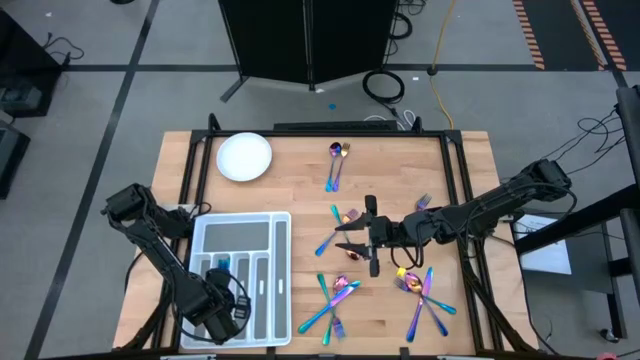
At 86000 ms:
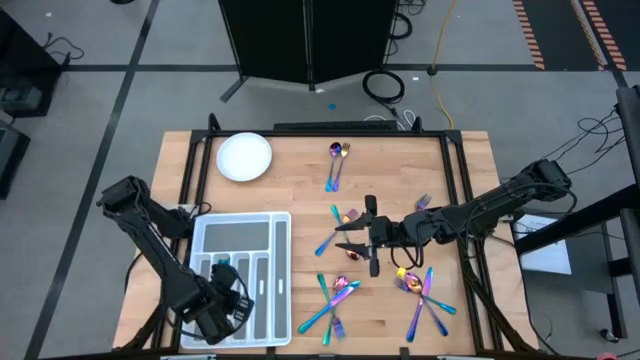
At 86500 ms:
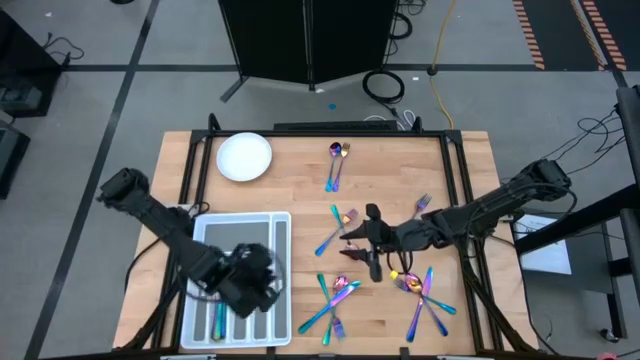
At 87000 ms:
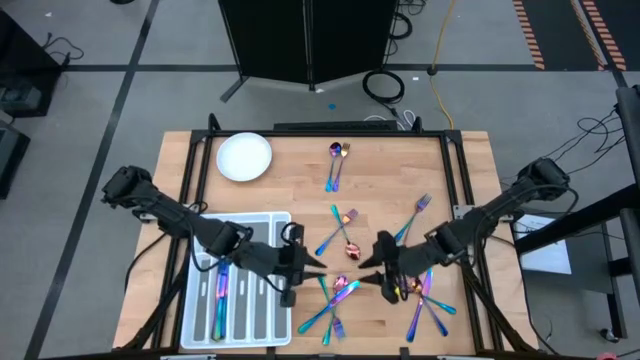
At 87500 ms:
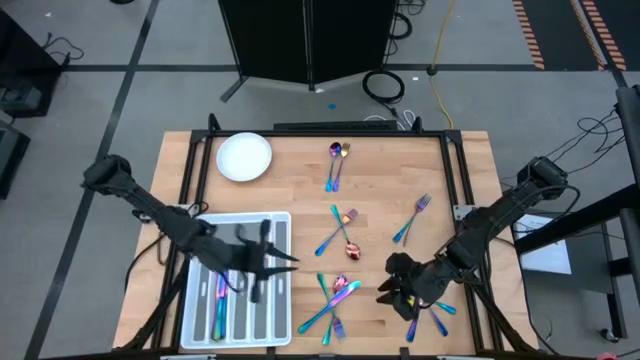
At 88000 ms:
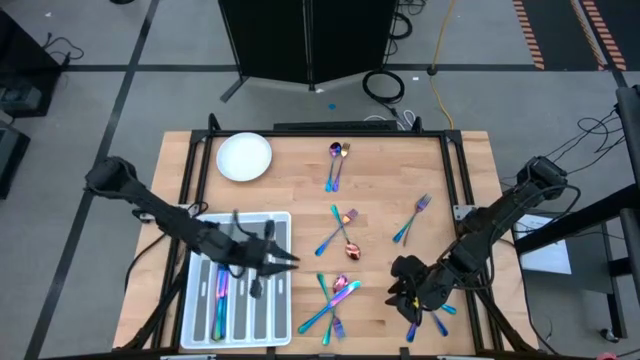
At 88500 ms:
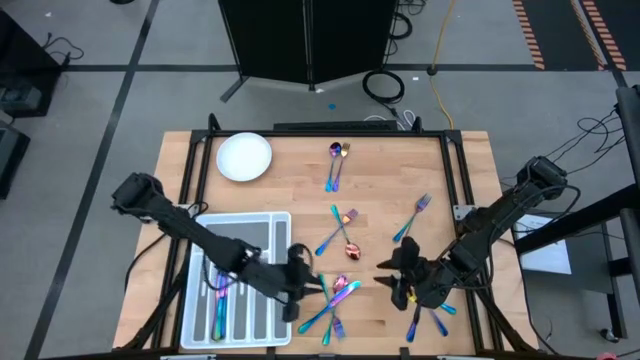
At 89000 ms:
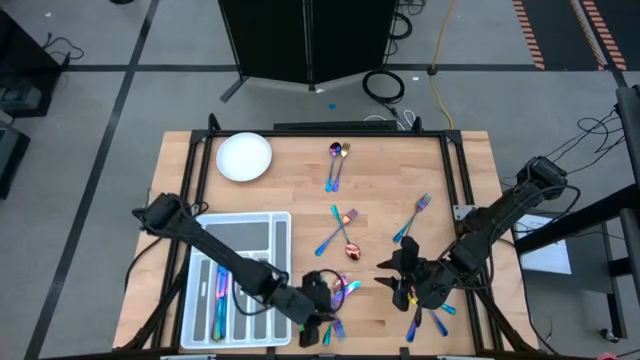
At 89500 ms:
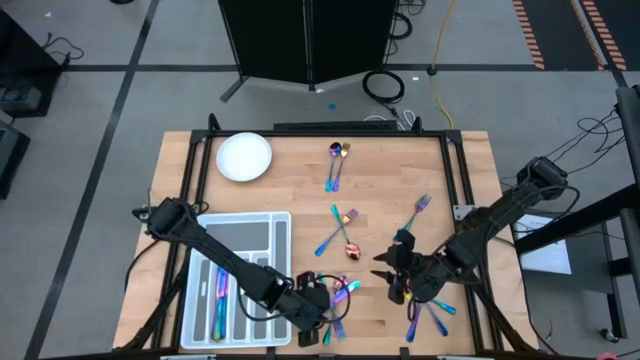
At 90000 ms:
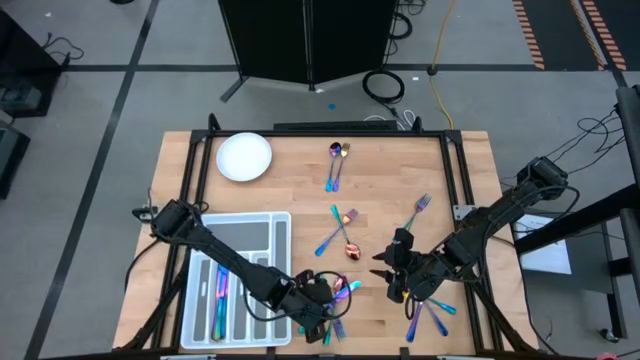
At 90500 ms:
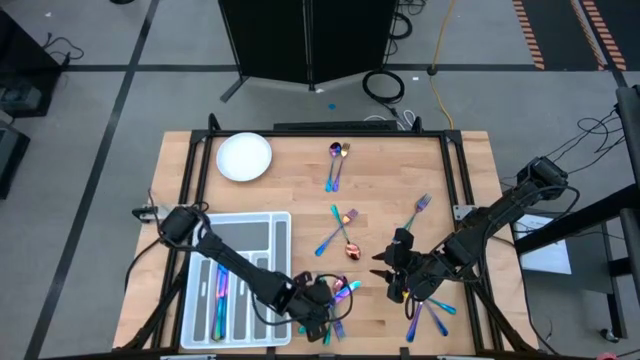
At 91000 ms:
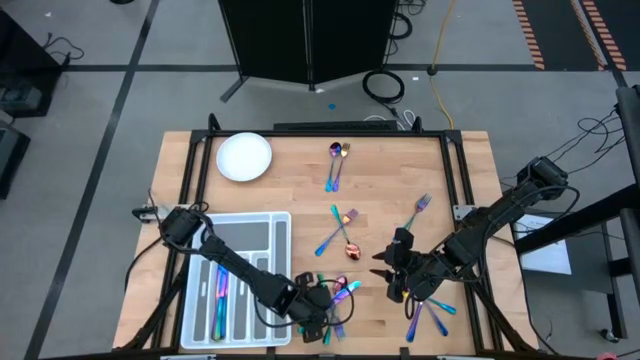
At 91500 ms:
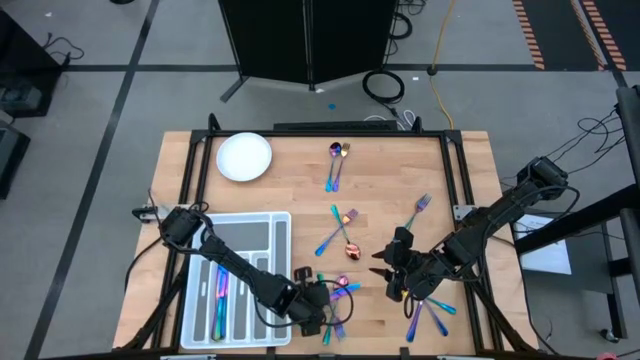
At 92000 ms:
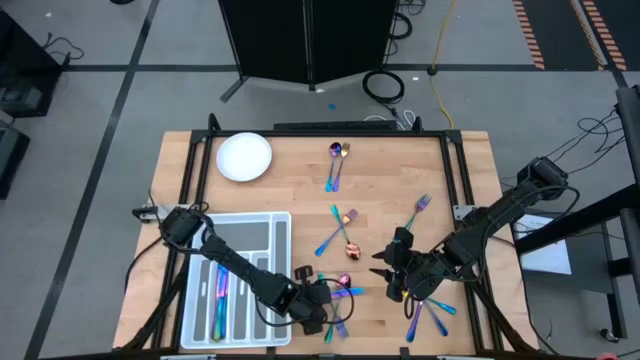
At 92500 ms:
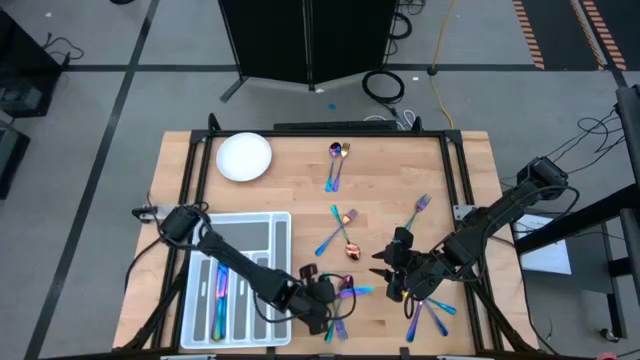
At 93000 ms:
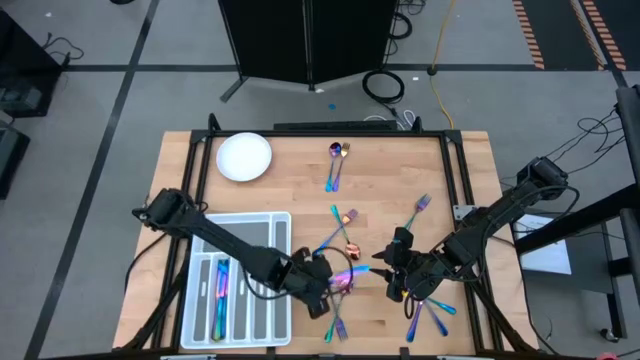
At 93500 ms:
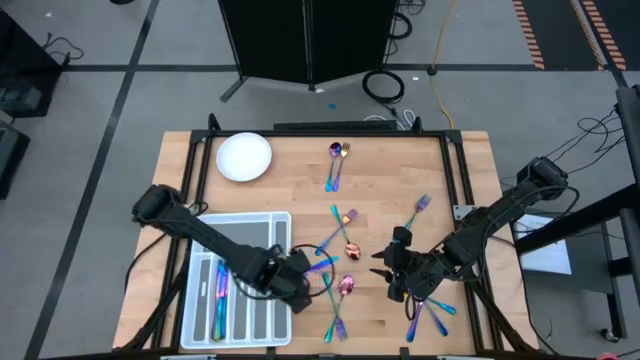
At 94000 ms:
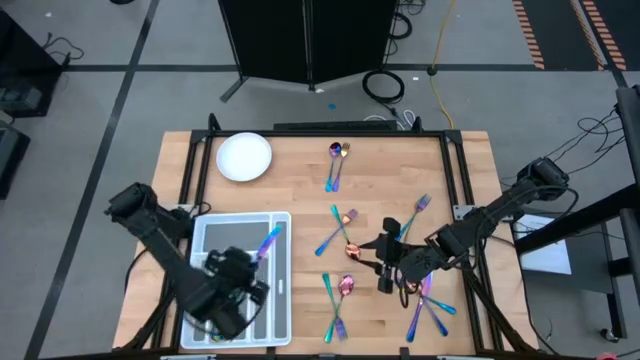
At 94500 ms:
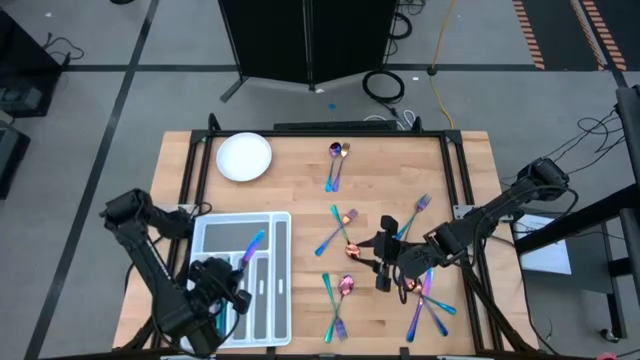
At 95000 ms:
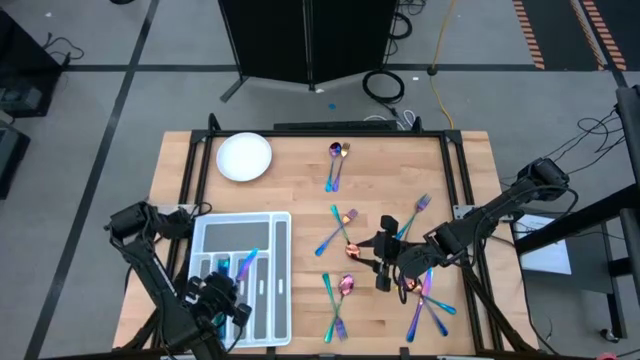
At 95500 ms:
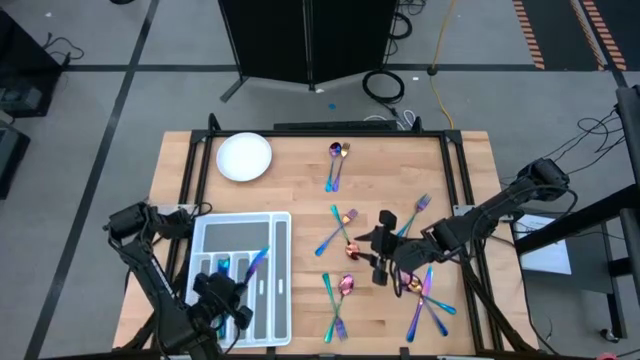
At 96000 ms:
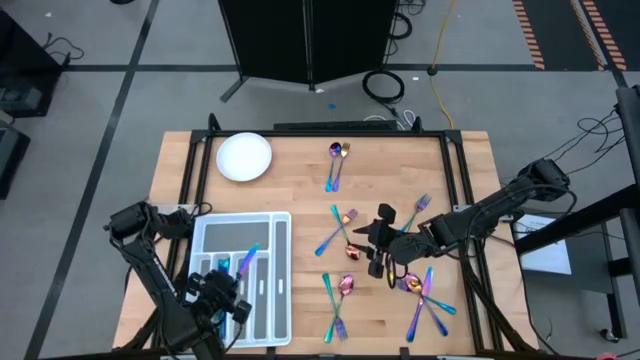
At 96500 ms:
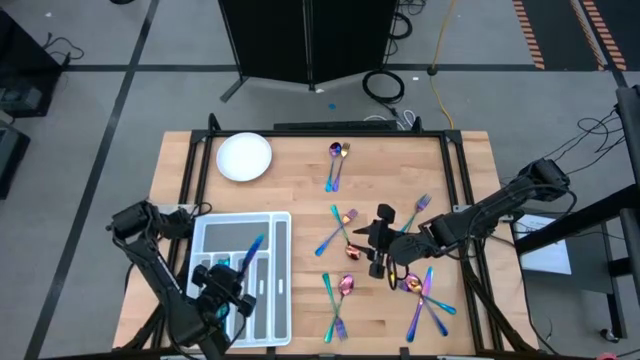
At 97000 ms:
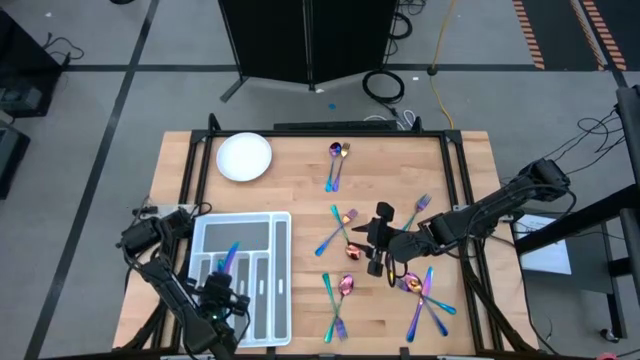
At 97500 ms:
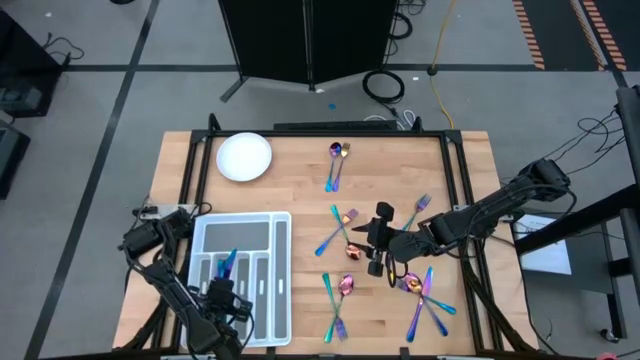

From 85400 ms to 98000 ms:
Task: Sort silverware
Put the iridescent blue knife in the silverware tray

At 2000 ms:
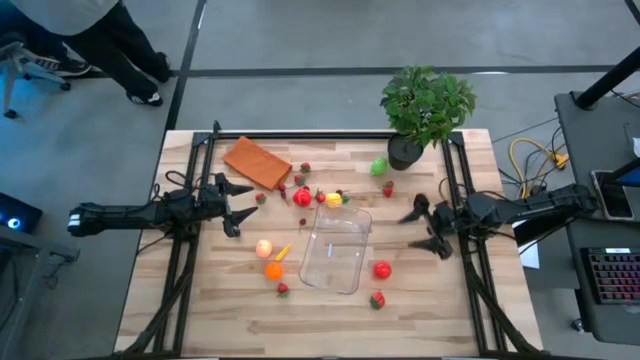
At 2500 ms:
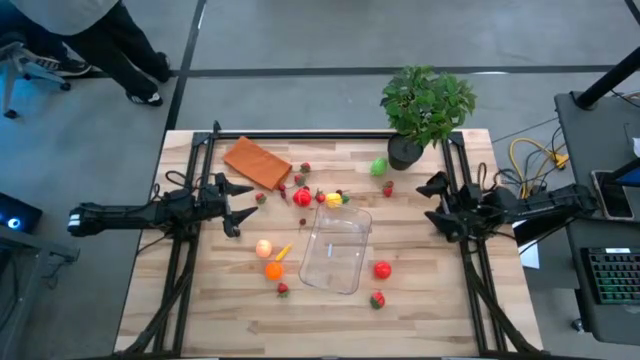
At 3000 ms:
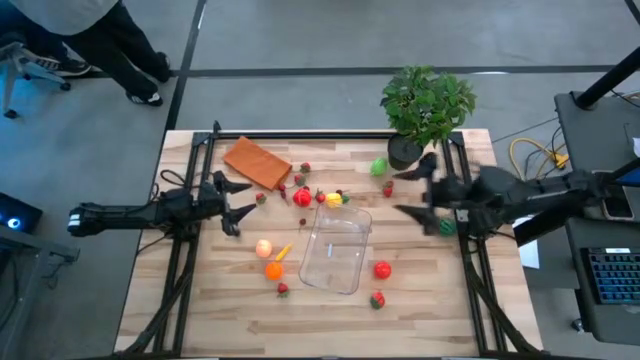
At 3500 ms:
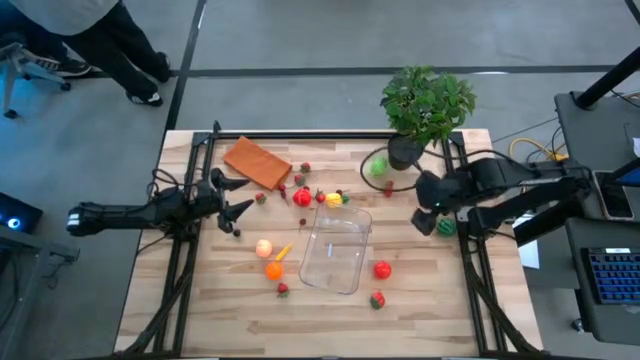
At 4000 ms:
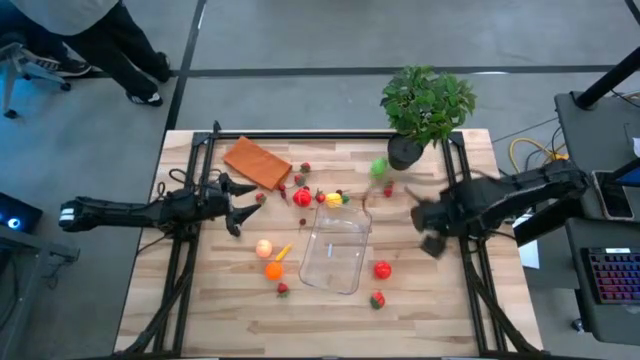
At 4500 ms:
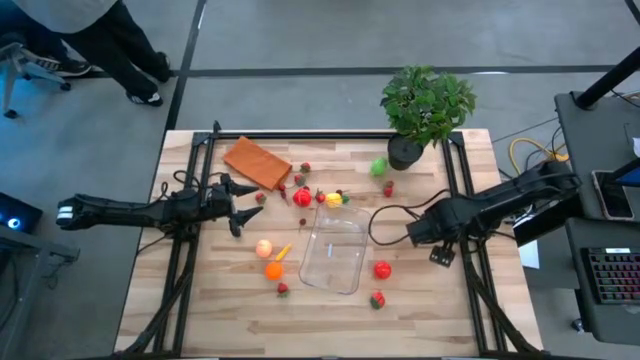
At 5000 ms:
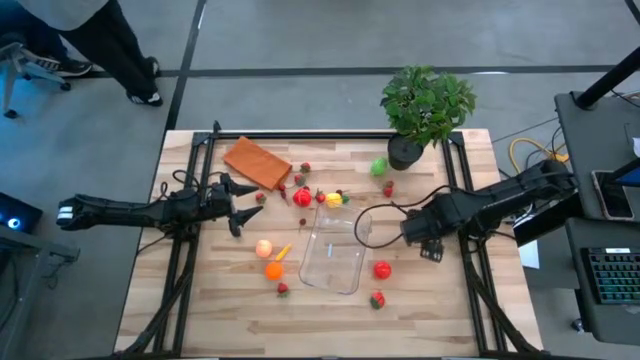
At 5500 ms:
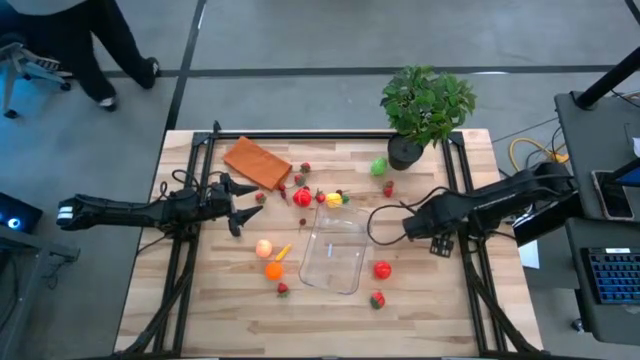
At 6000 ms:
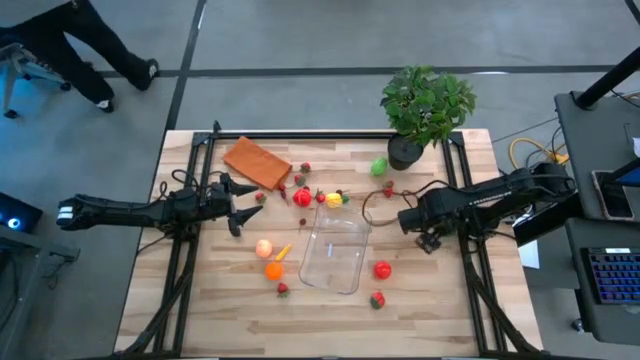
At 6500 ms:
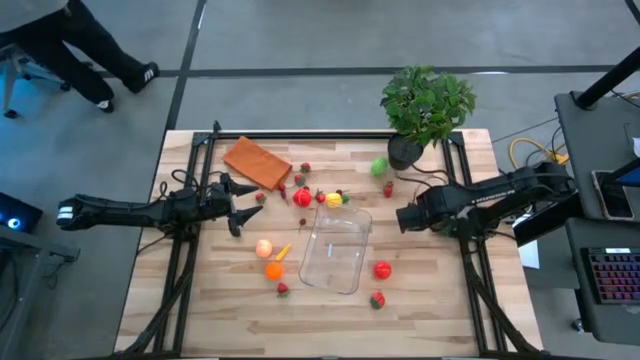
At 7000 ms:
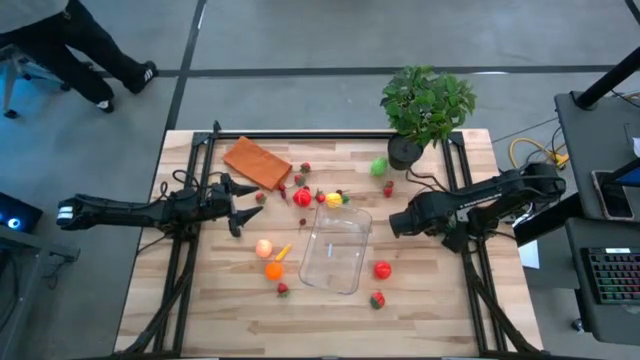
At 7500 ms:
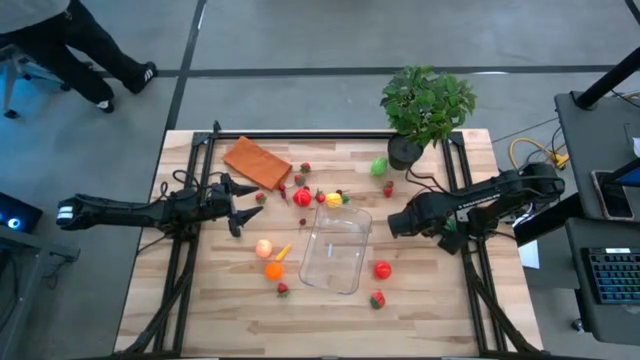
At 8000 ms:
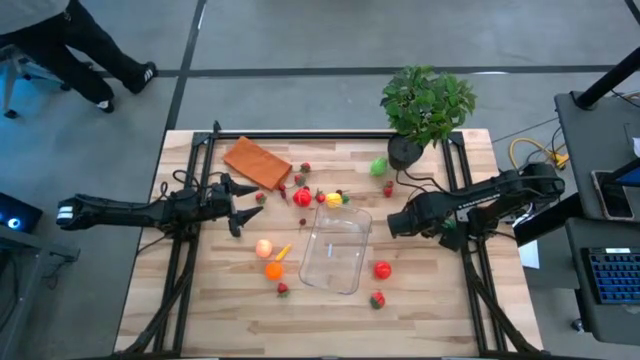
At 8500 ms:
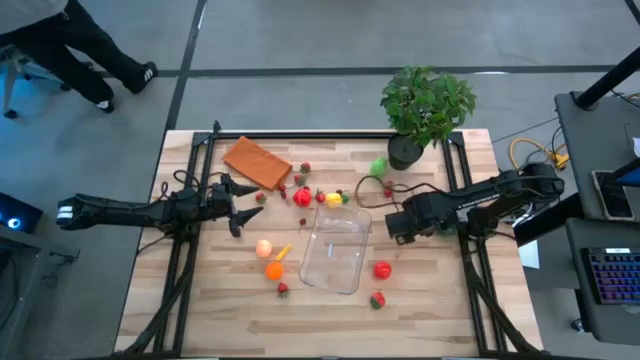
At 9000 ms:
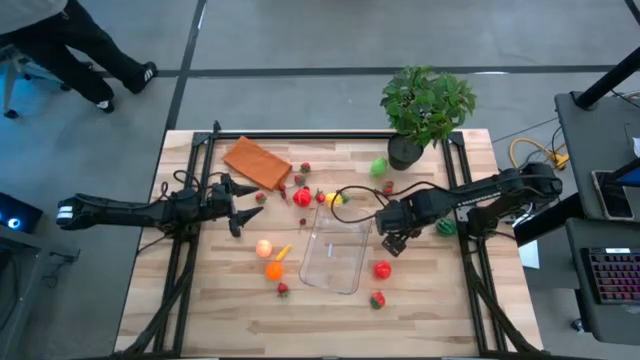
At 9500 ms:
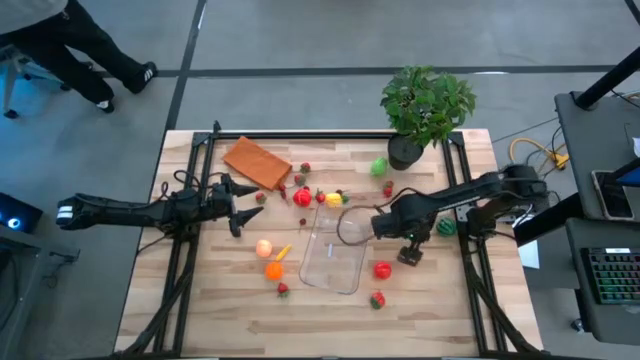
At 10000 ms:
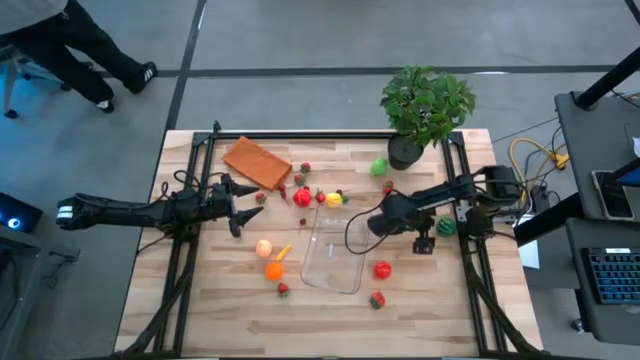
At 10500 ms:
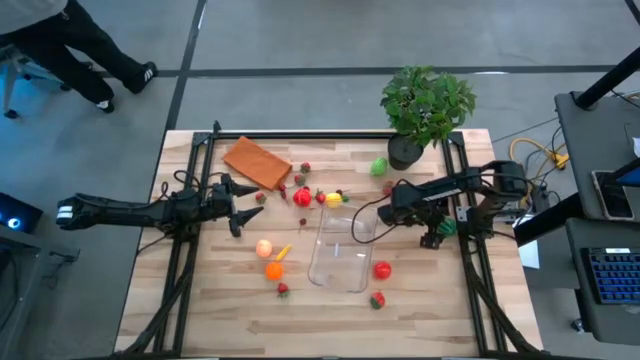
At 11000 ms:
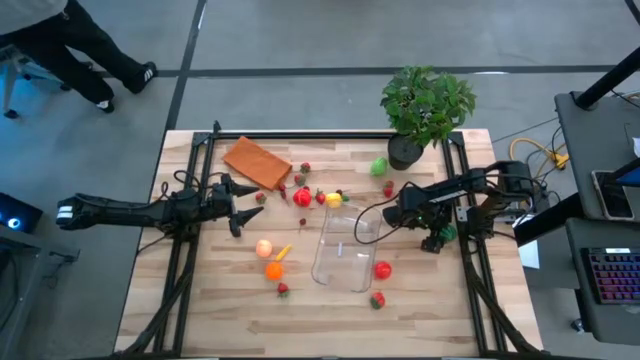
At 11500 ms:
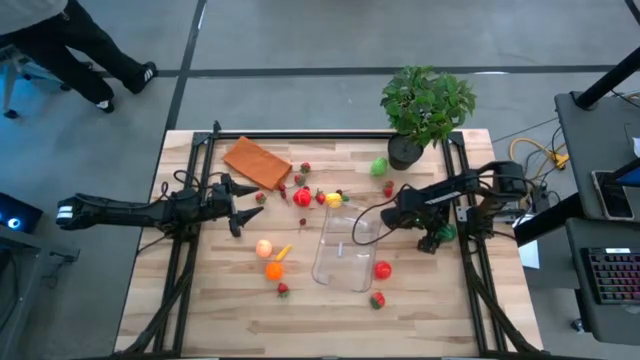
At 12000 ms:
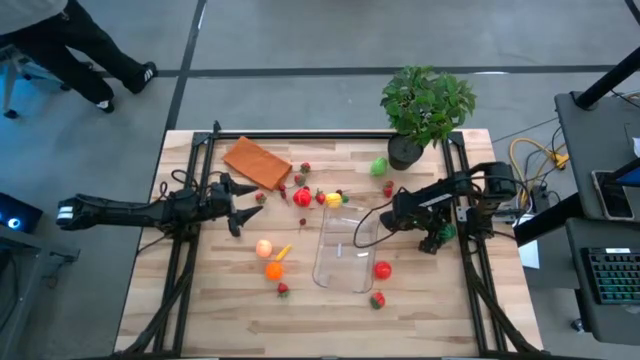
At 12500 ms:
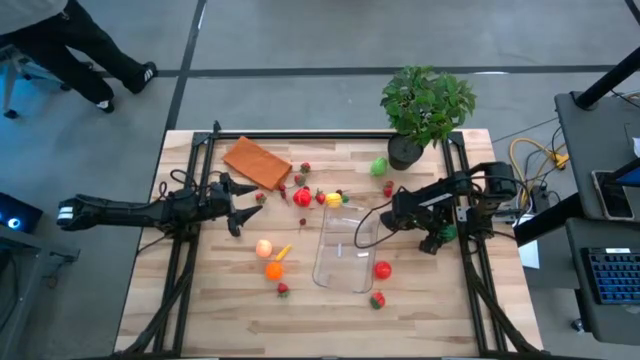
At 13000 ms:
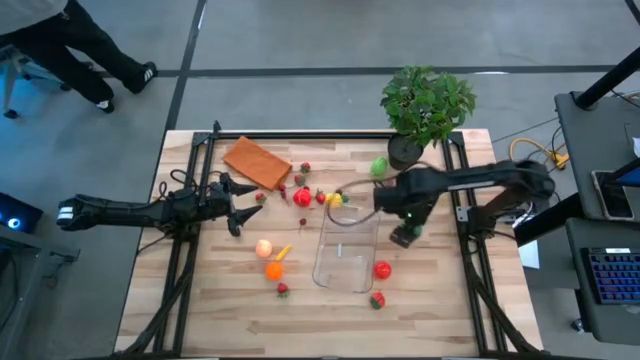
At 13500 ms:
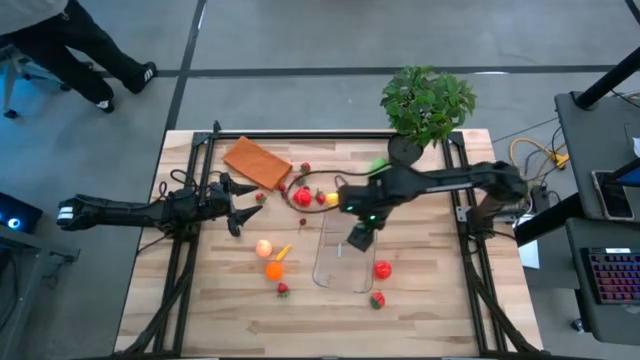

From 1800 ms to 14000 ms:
Task: Pick and placing Produce into tupperware
Put the watermelon into the transparent bin
